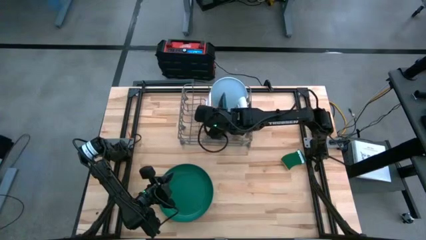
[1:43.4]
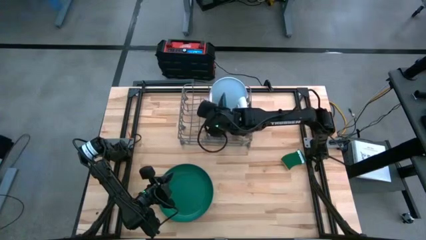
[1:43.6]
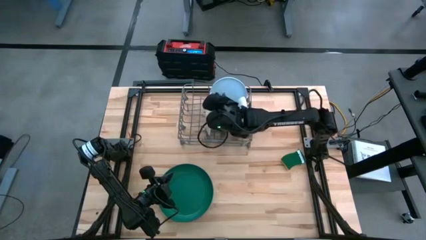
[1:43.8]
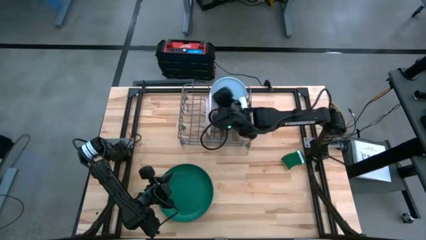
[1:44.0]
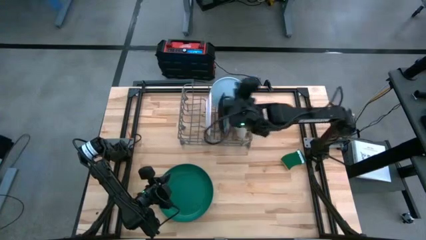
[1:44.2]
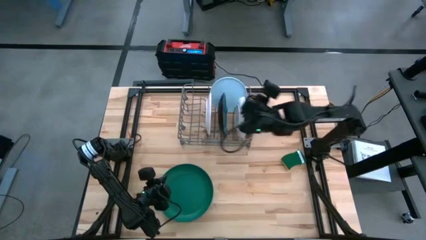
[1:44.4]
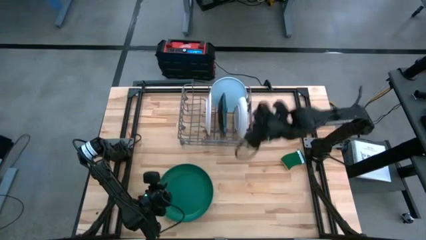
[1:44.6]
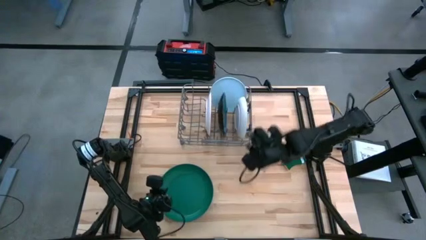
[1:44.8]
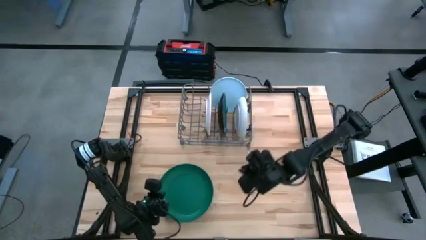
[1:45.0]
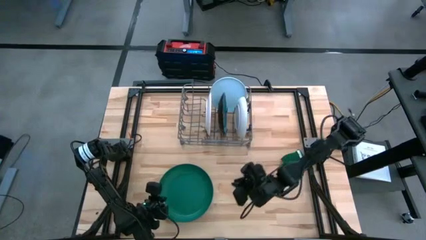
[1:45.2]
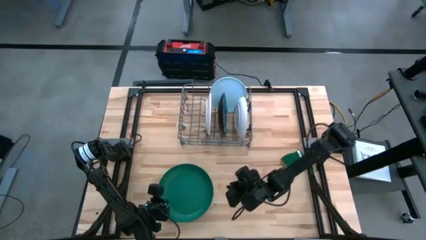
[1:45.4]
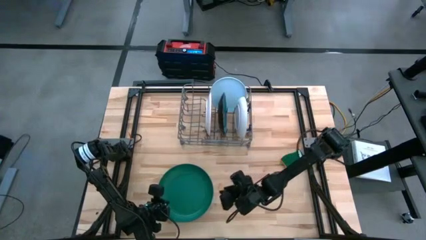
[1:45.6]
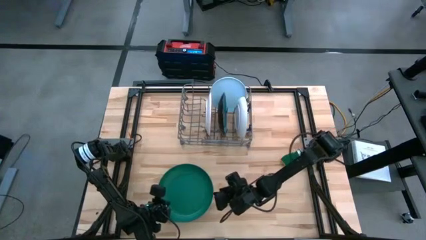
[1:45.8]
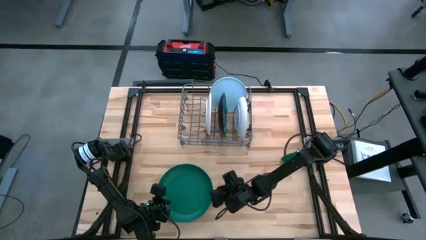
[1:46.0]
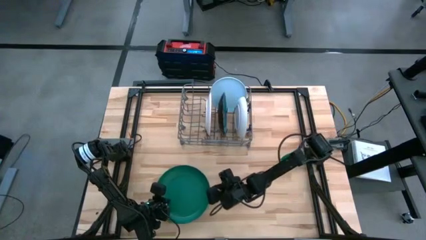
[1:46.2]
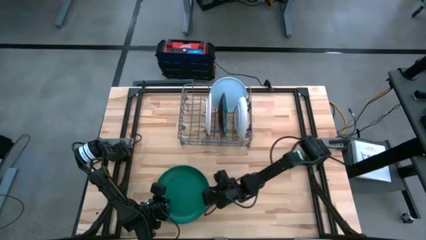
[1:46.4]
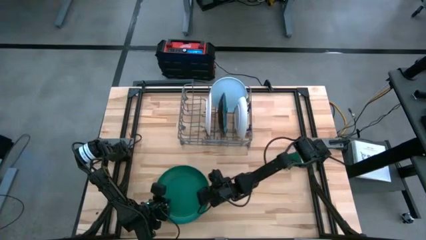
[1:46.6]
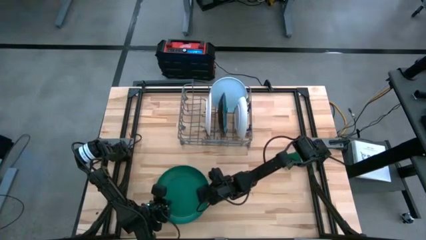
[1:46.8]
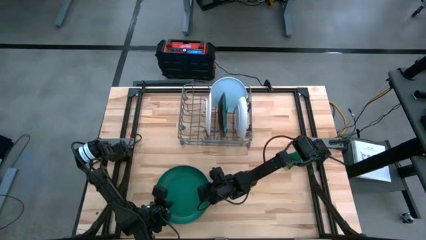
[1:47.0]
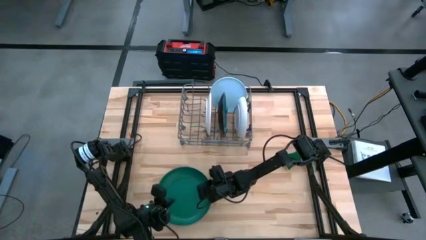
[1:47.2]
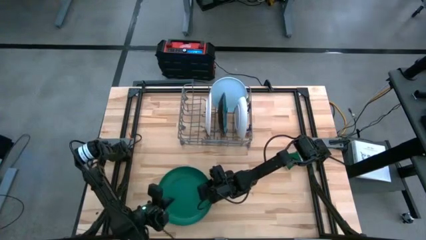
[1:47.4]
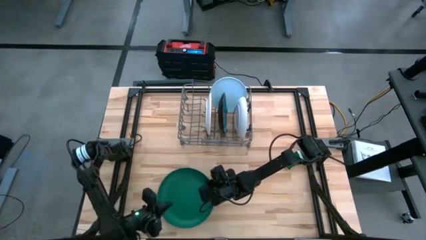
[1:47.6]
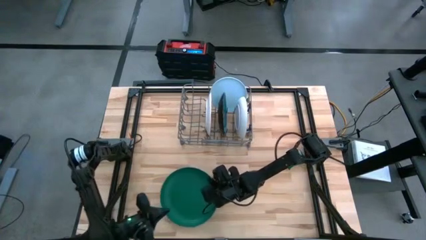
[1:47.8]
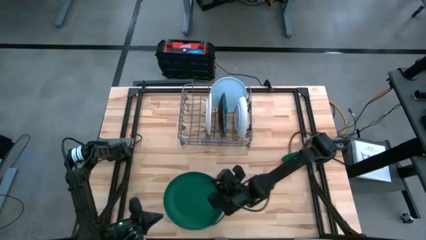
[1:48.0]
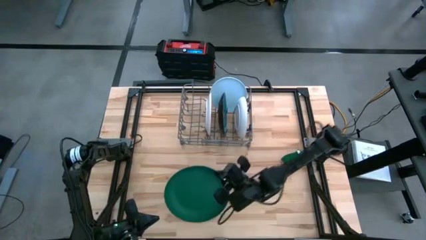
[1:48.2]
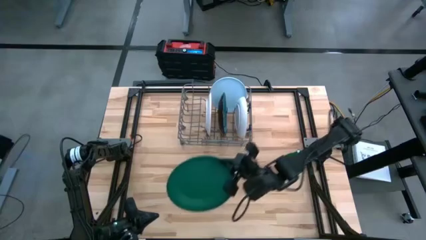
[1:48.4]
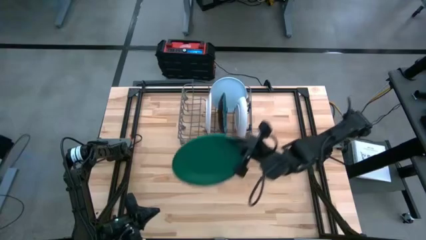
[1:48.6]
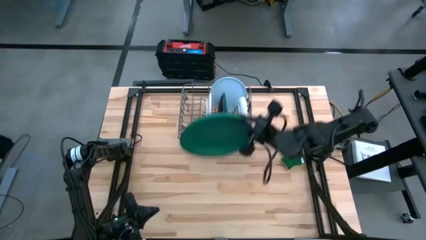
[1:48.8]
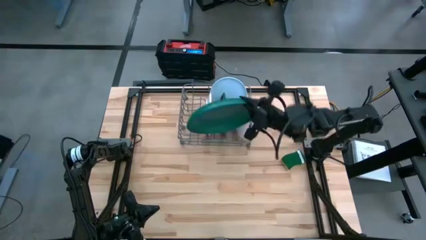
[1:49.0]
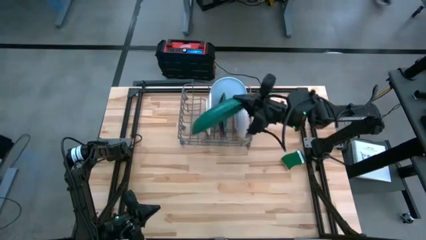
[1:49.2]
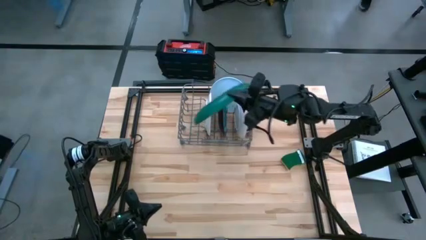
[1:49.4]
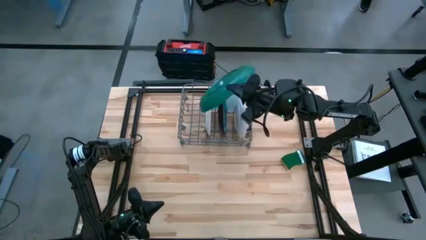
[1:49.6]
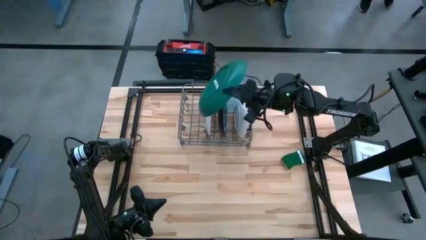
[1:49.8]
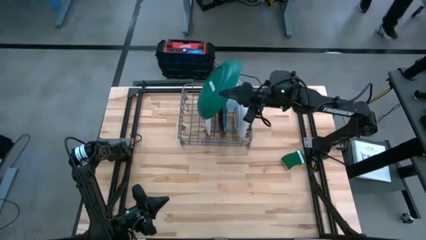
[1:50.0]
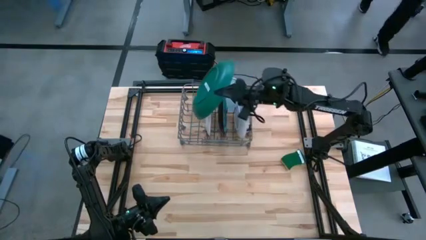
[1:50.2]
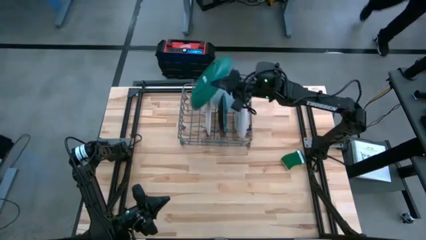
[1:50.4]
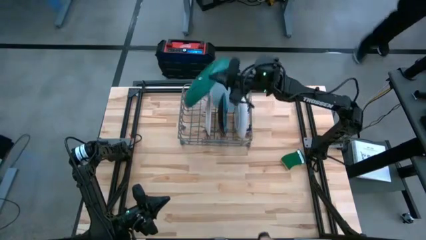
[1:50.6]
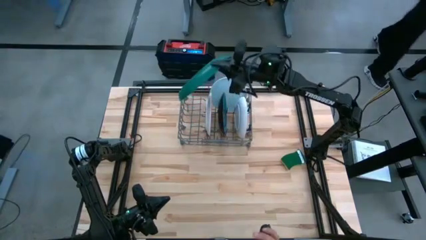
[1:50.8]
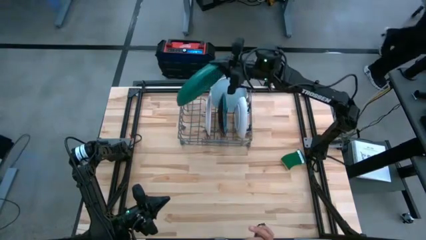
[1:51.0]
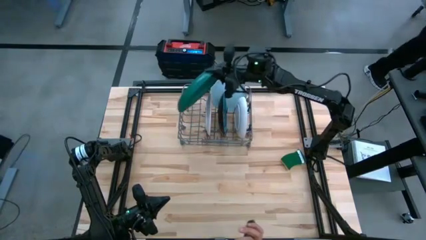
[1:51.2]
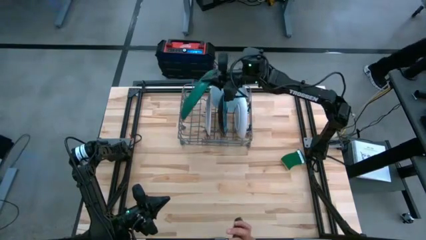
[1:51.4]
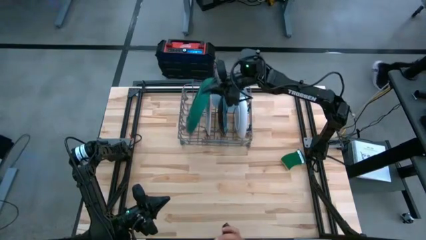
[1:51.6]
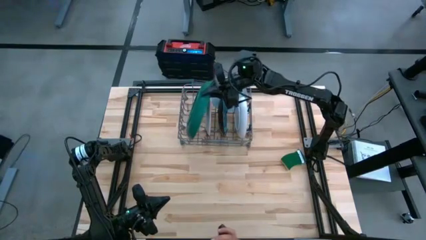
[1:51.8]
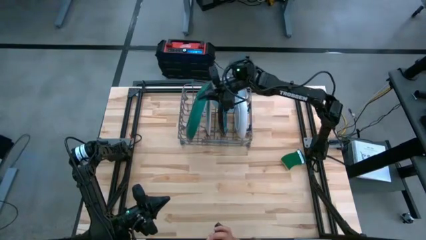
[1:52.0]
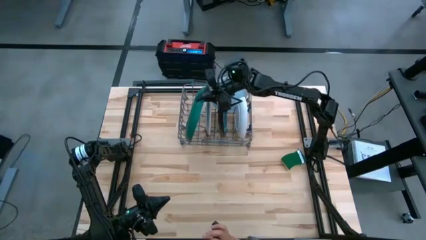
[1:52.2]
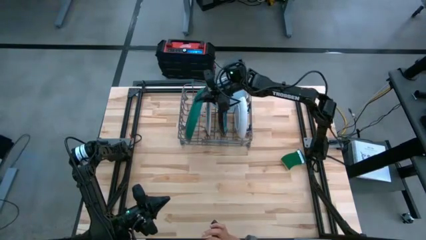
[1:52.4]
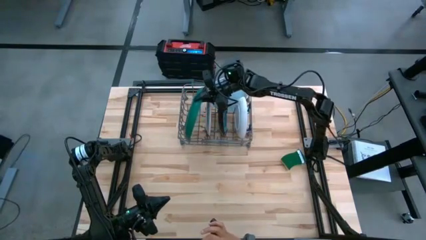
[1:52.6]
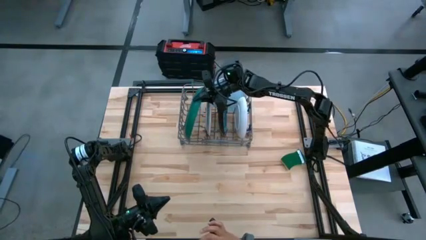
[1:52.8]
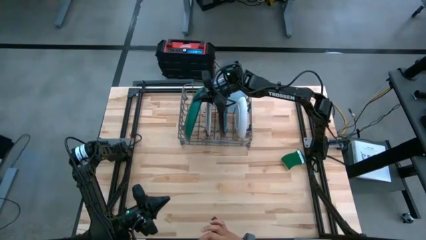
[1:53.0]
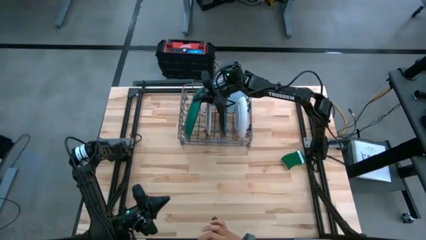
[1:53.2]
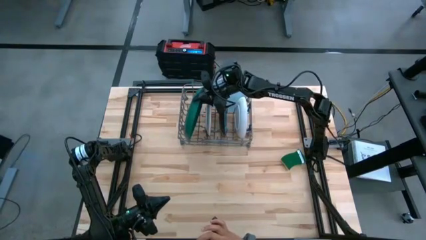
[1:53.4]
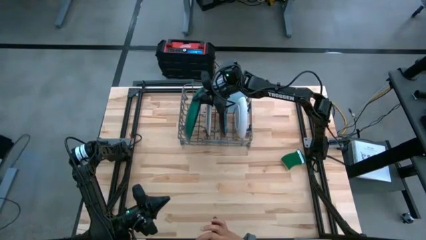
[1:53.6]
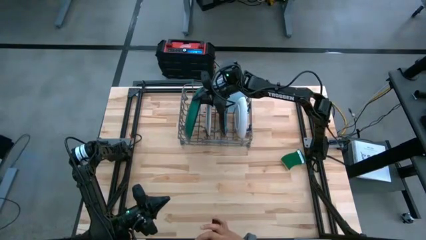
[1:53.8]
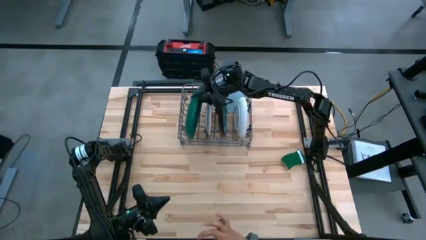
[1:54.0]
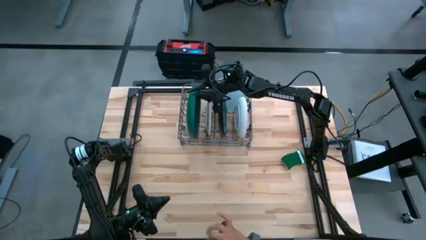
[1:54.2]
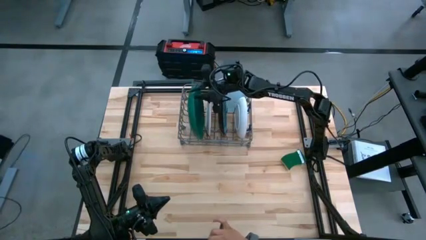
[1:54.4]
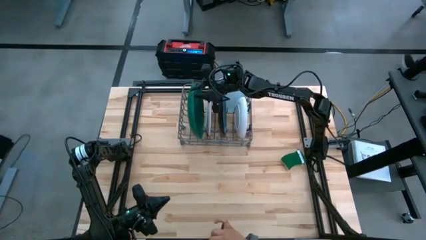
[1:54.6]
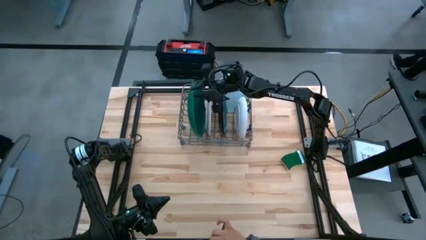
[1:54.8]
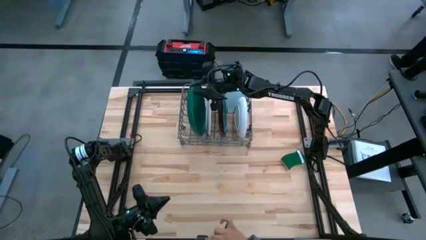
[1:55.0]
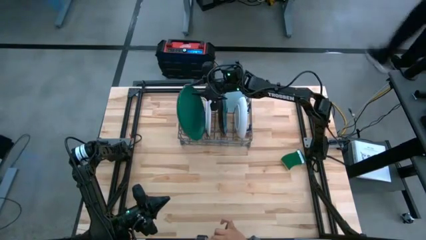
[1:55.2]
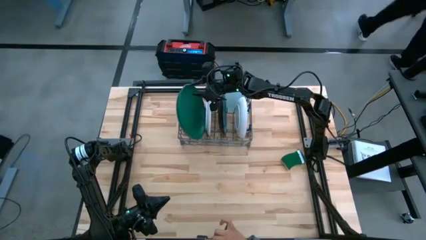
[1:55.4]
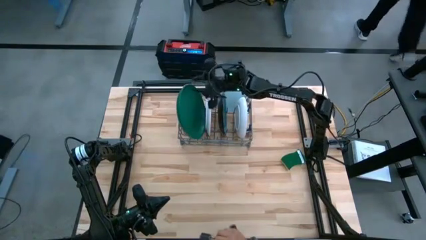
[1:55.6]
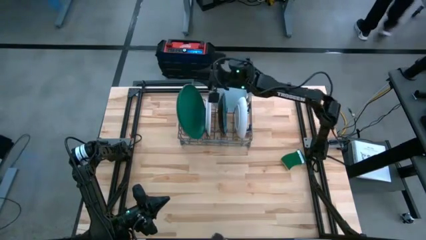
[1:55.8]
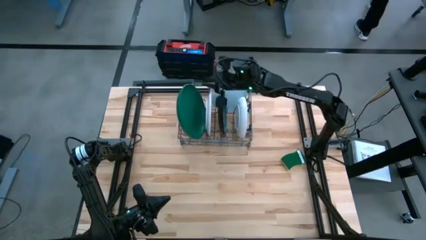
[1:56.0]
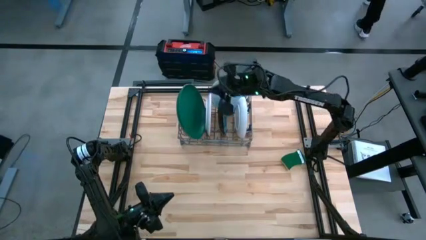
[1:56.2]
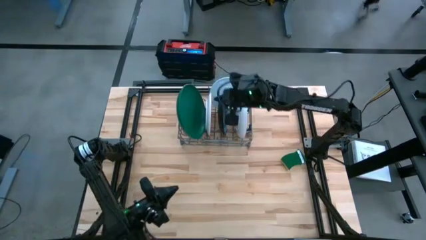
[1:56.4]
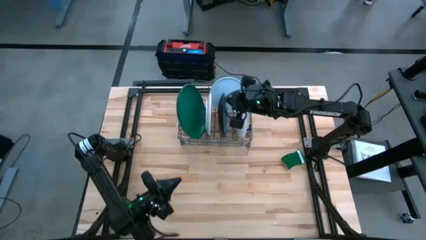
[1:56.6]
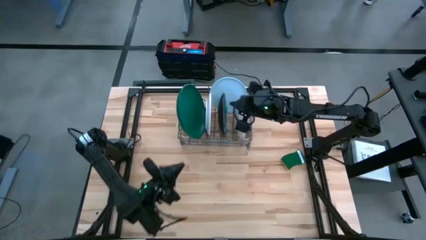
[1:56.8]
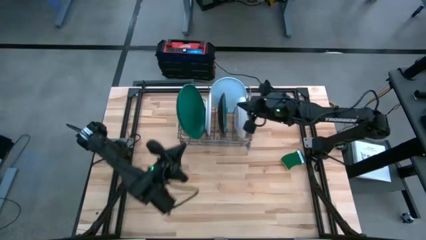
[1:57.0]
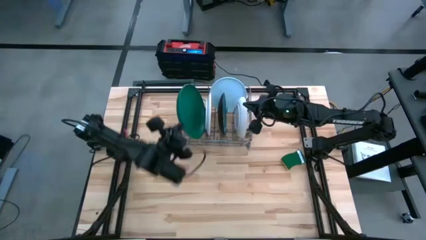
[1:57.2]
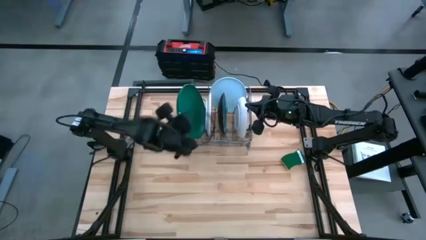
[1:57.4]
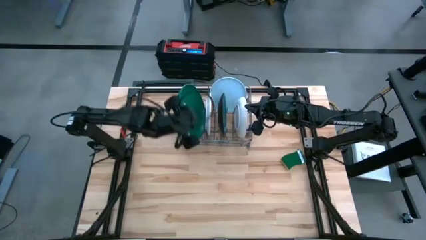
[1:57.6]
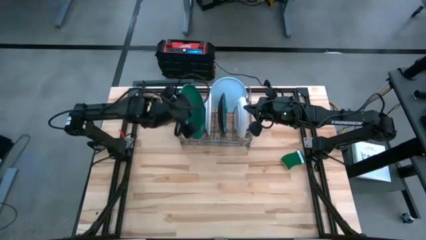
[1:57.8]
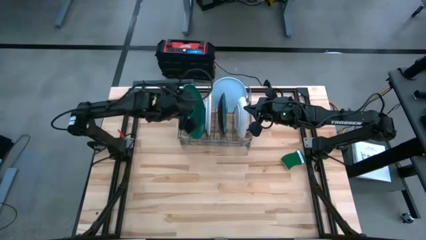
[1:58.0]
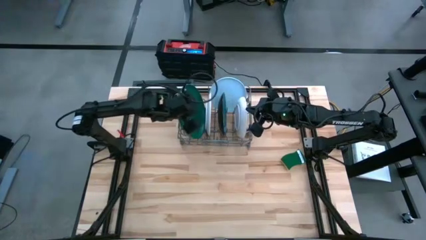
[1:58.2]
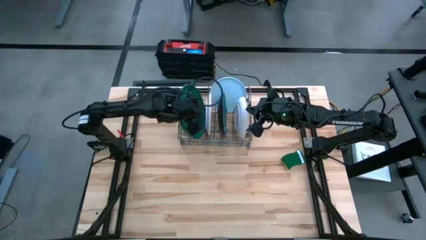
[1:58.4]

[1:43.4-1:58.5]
Task: Sort dishes
Put the dark green plate in the dishwasher rack

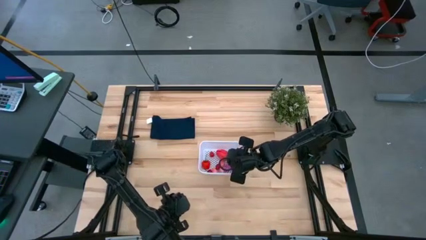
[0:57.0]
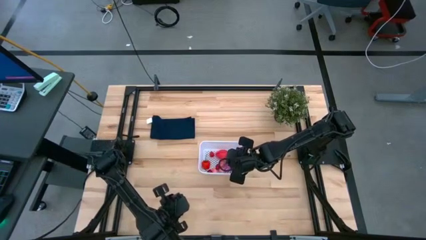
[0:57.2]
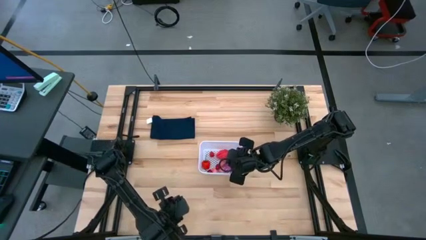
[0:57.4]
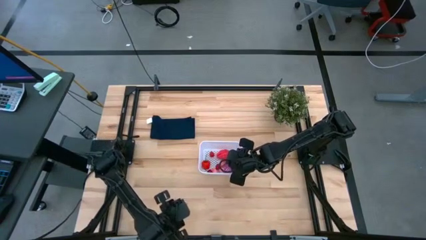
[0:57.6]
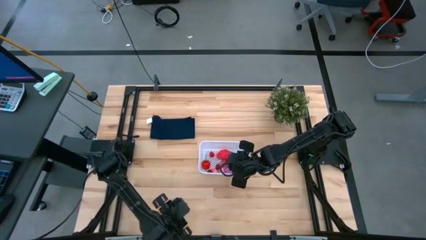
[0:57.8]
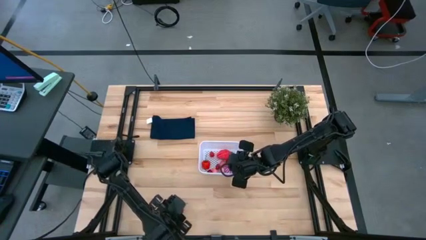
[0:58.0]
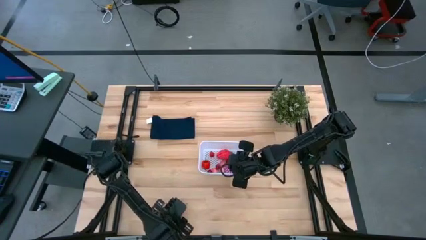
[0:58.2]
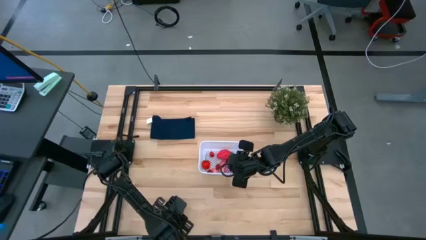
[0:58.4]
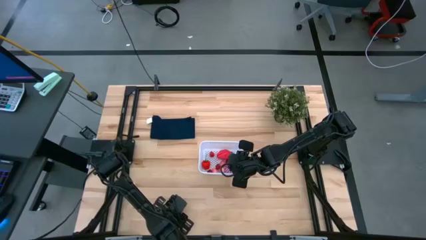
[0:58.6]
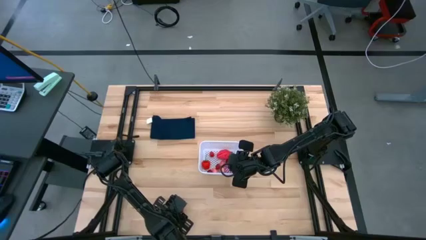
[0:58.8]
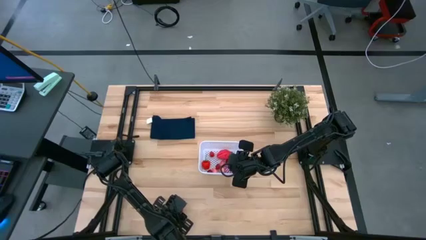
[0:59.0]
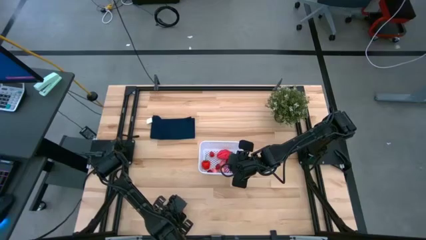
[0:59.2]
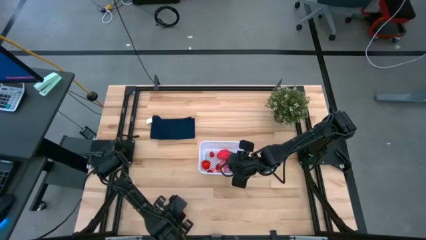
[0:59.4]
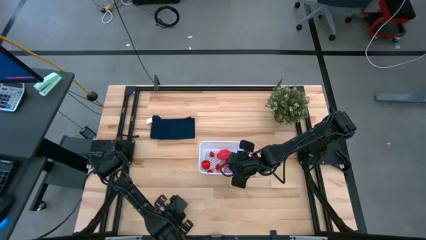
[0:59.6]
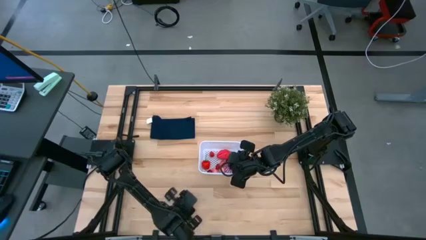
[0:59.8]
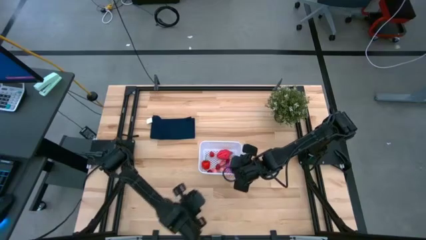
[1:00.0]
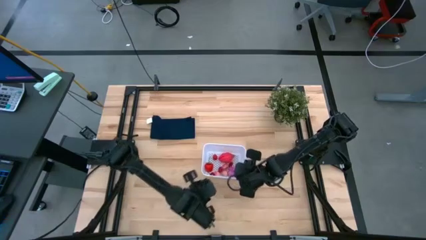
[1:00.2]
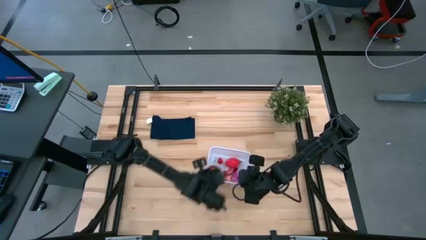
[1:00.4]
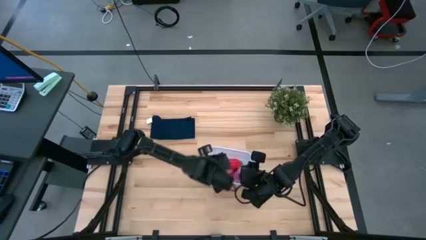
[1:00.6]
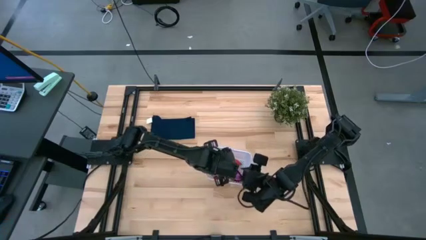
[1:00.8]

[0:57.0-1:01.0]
Task: Pick and placing Produce into tupperware
Put the cherry into the white bin
